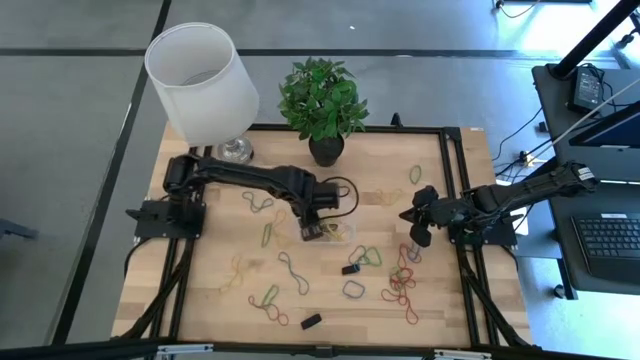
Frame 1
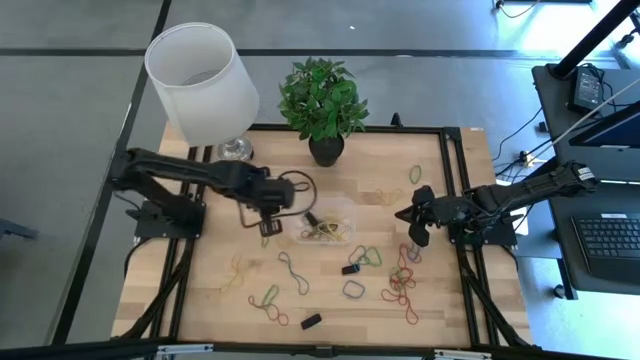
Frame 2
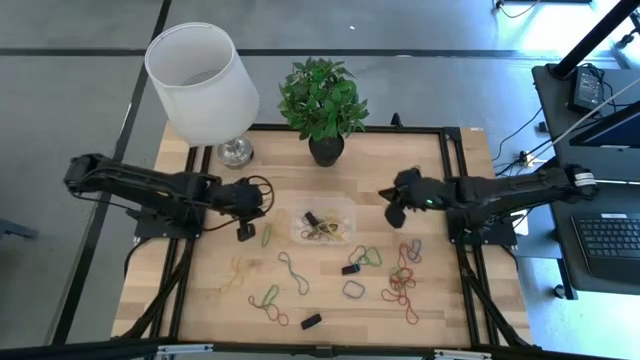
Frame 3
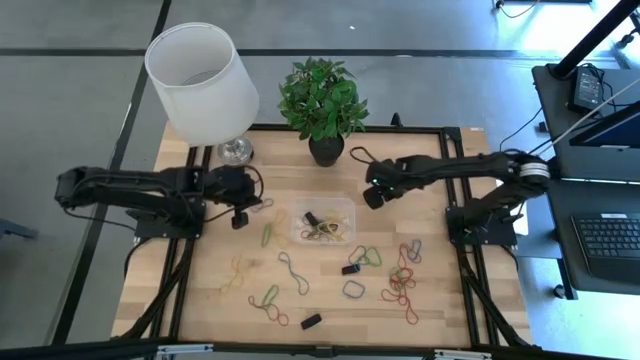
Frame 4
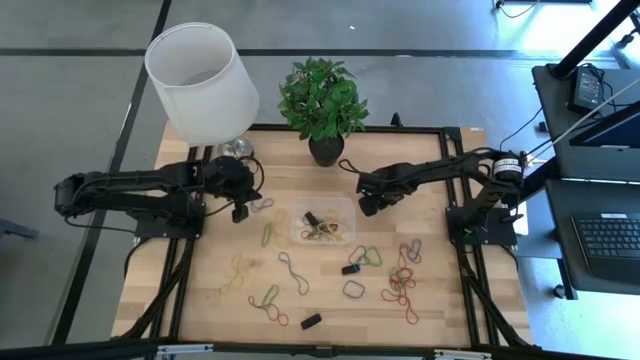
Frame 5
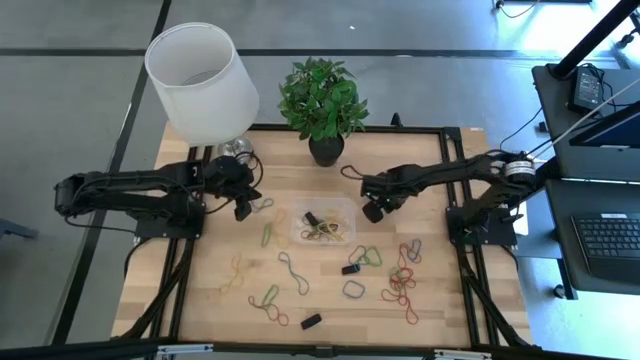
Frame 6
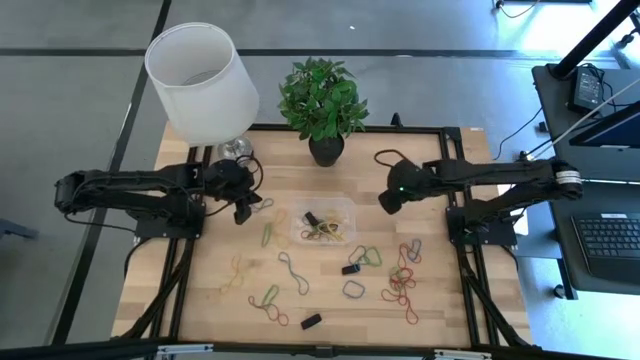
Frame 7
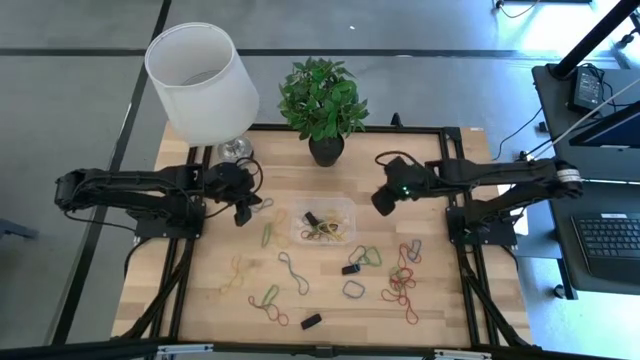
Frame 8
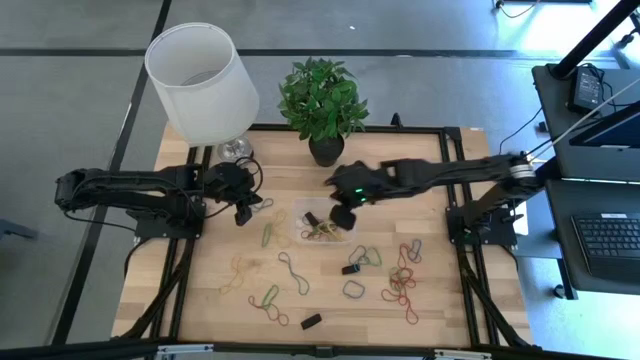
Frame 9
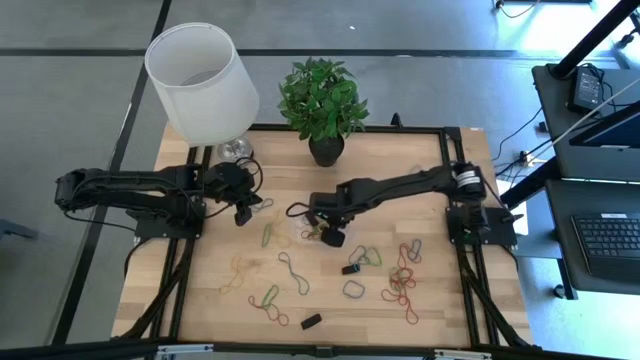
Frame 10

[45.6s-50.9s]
Task: Pick and place rubber bands into bin
Put the top yellow rubber band into the transparent container

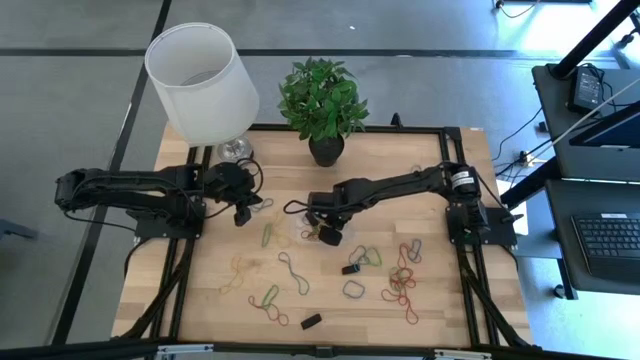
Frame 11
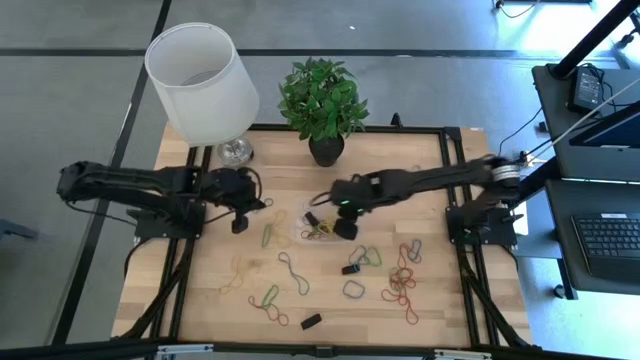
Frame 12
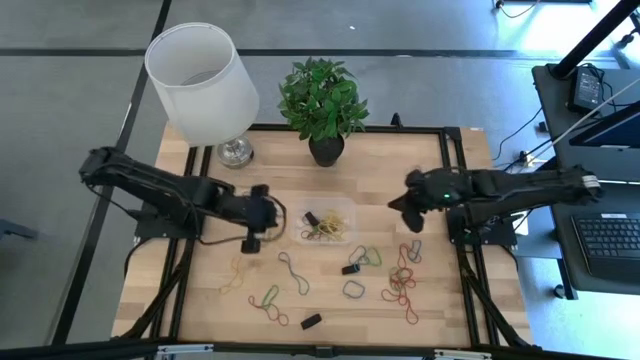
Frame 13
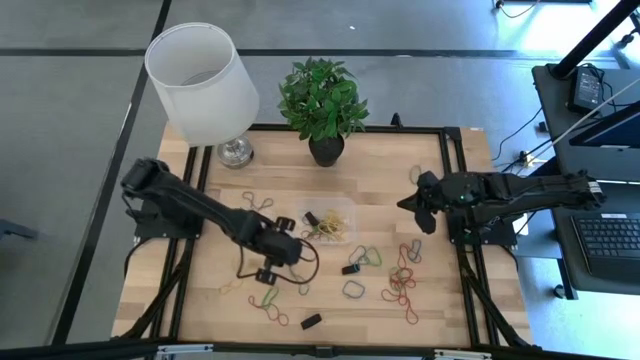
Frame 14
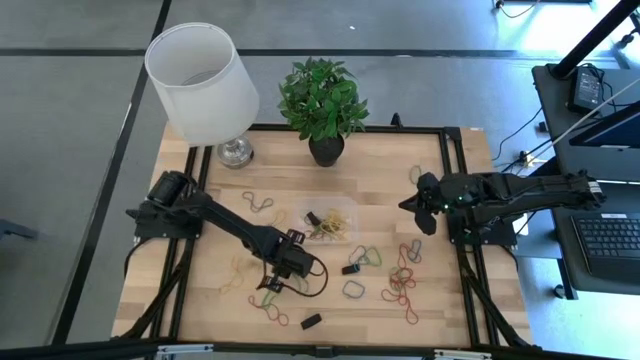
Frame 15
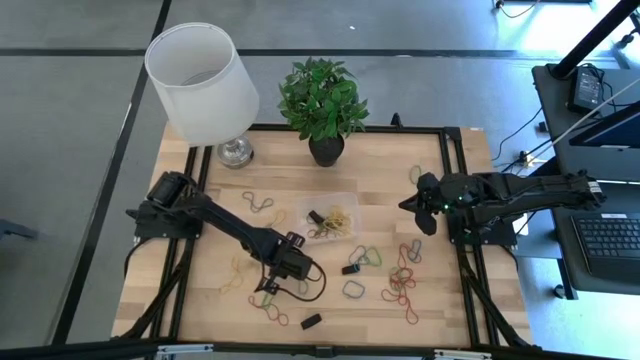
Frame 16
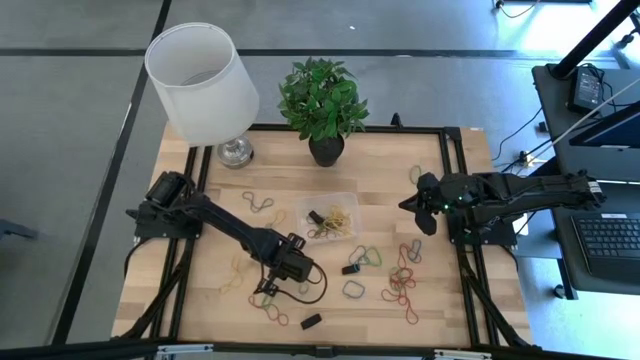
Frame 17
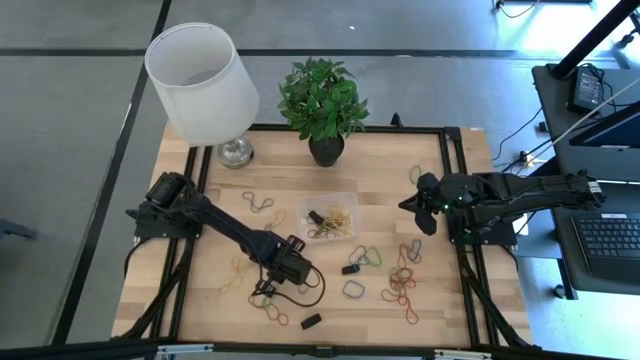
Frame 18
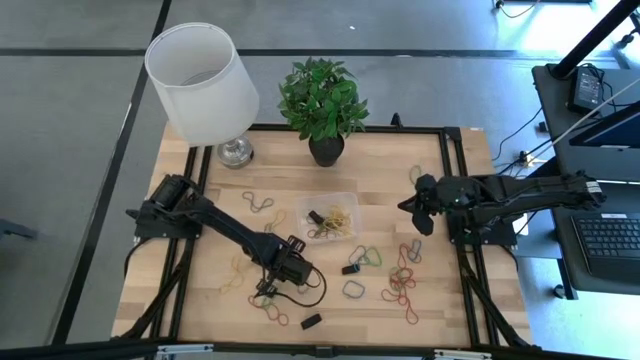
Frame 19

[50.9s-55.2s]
Put the blue rubber band into the transparent container

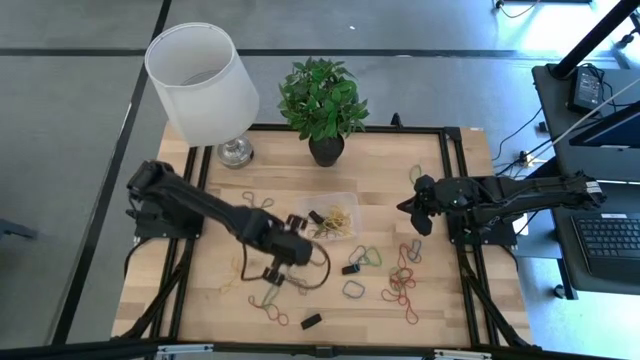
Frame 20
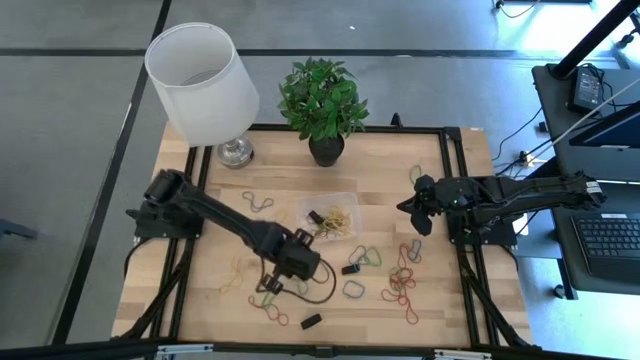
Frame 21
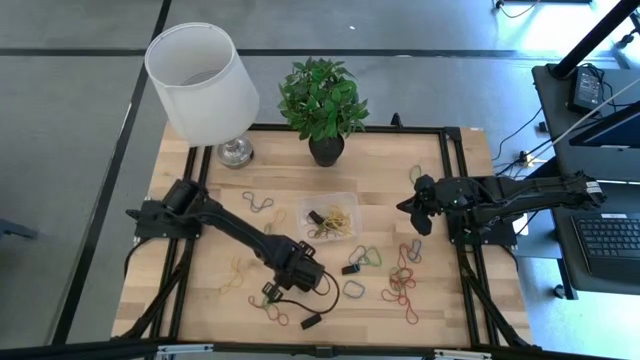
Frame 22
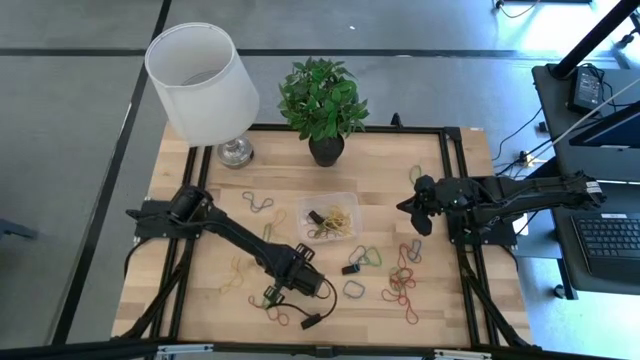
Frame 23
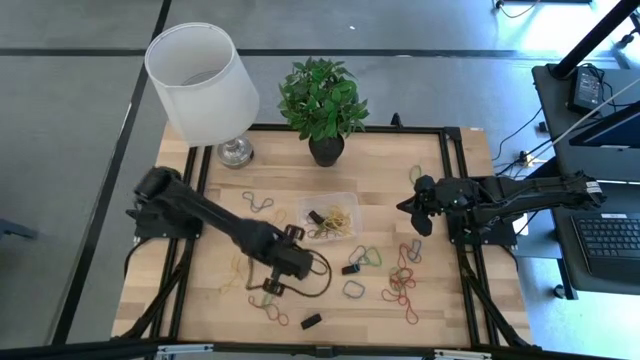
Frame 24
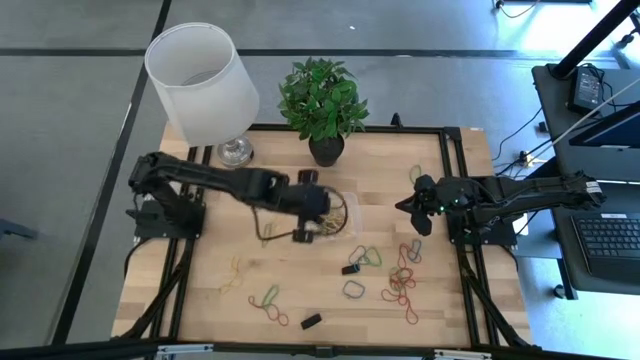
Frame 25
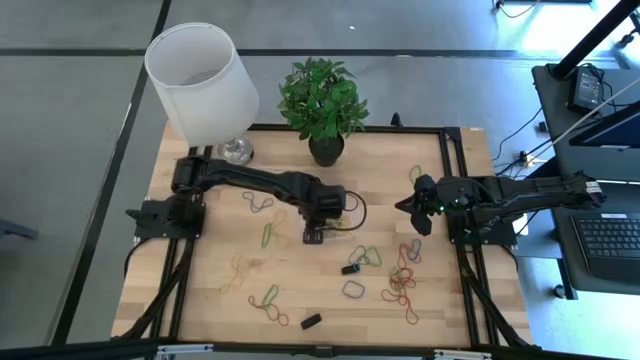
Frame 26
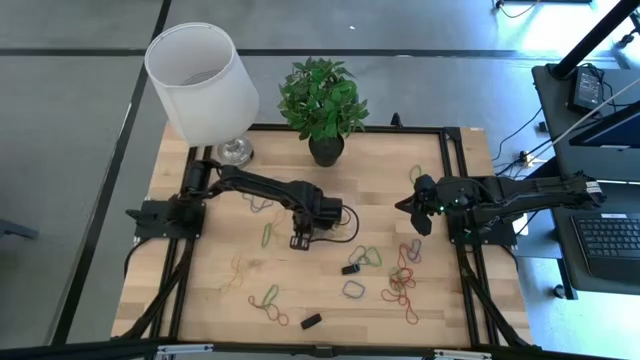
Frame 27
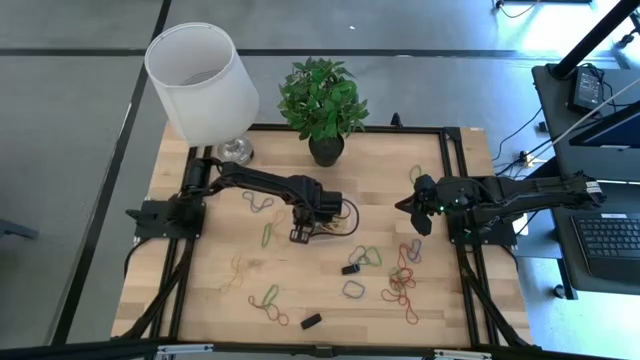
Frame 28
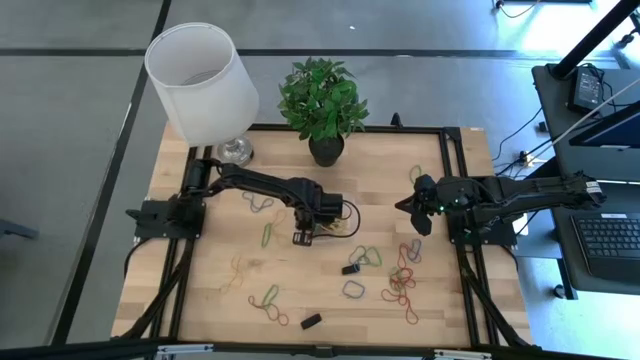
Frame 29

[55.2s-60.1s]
Put the blue rubber band into the transparent container

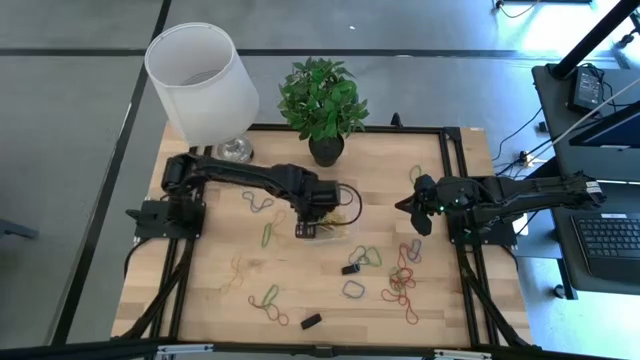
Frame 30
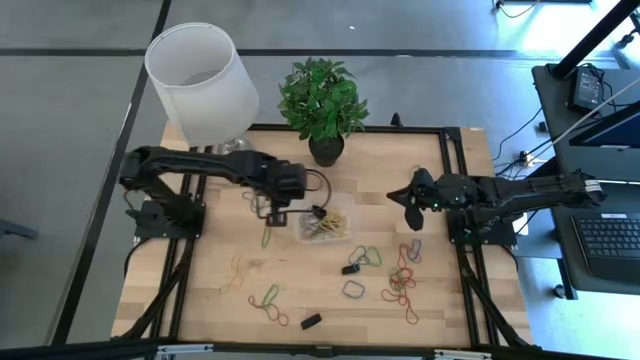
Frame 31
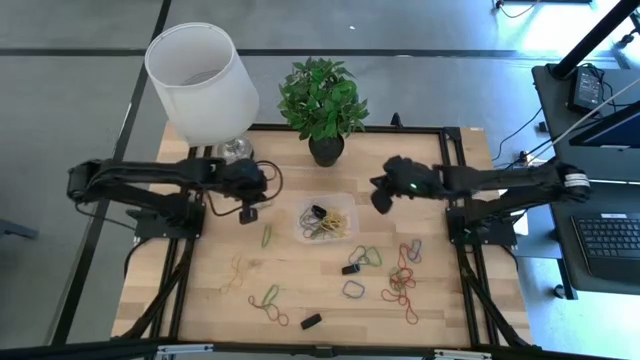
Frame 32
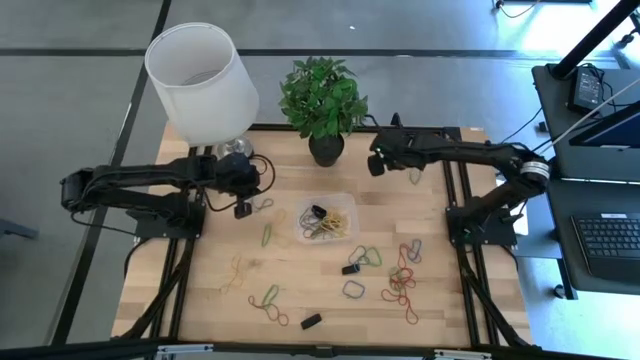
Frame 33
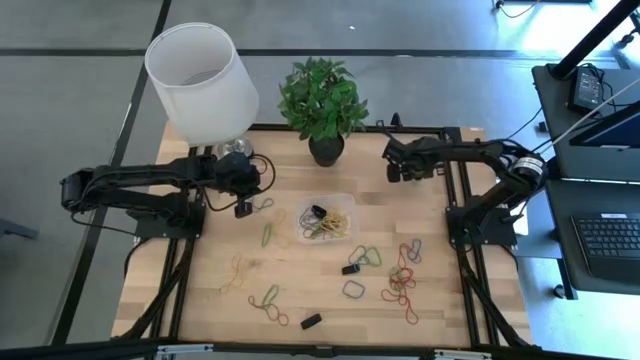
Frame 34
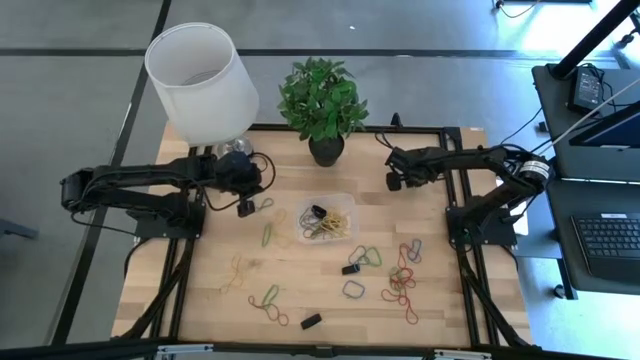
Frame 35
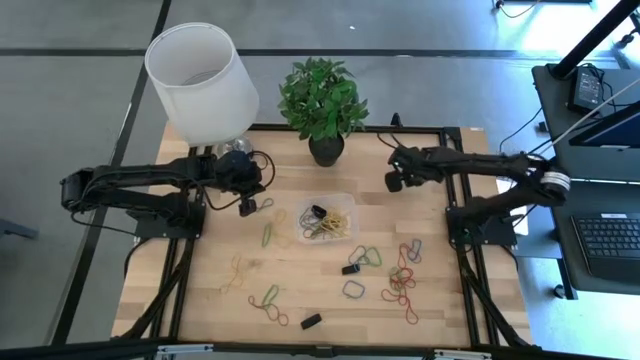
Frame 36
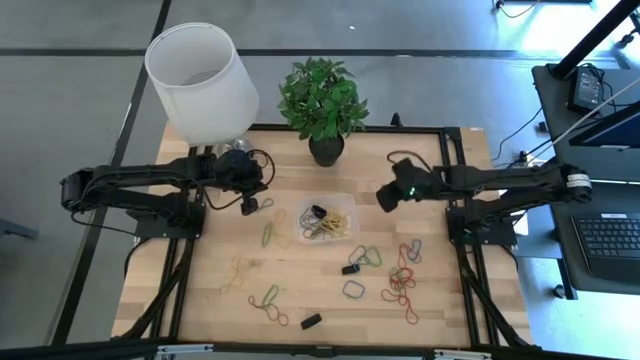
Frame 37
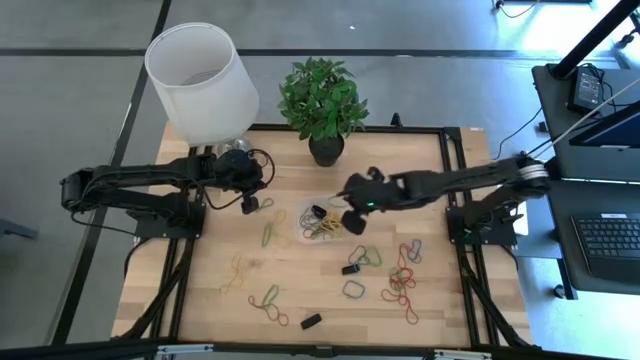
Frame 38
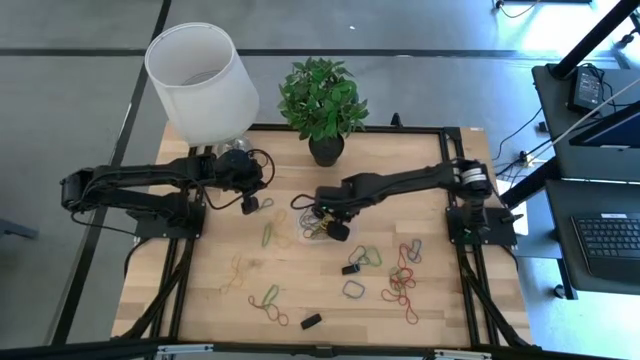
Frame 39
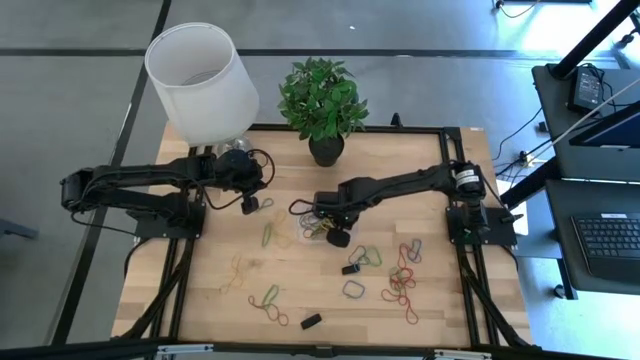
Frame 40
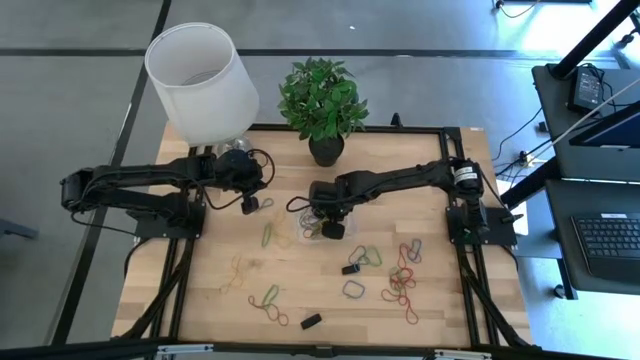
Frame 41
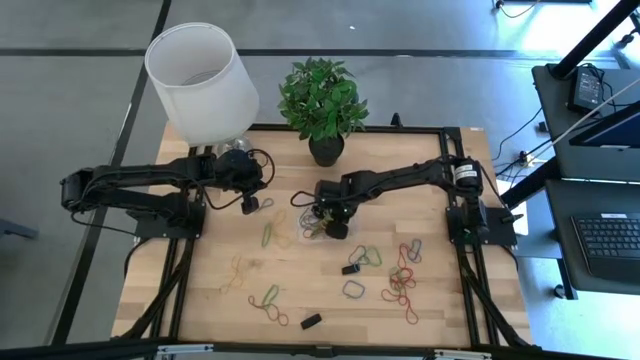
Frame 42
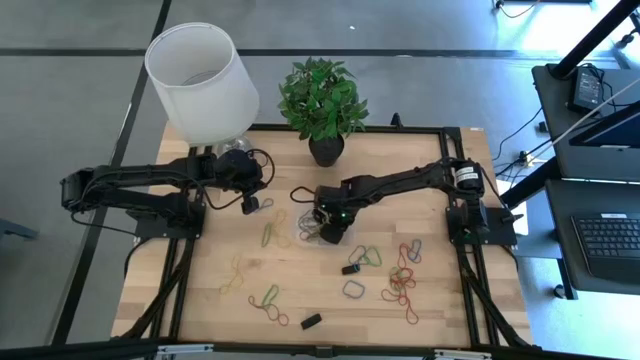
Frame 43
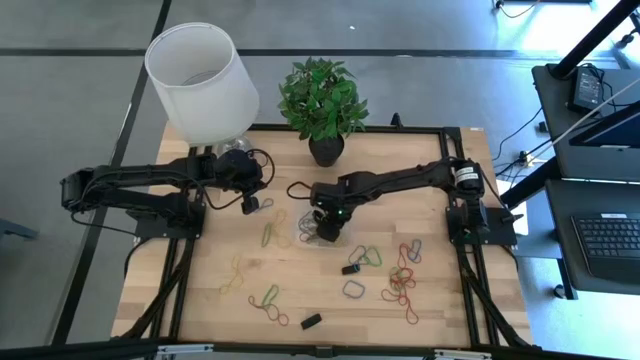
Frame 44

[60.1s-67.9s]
Put the green rubber band into the transparent container

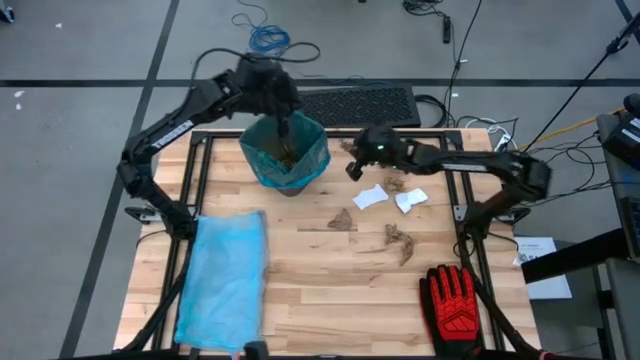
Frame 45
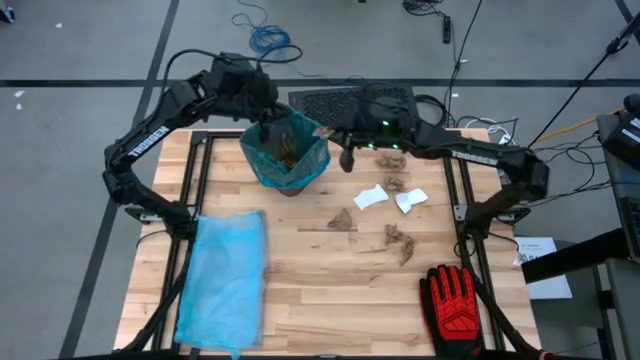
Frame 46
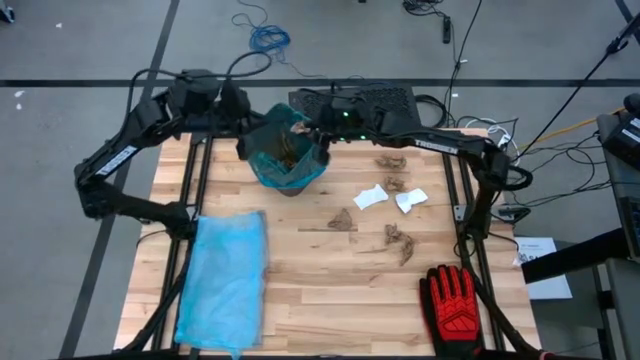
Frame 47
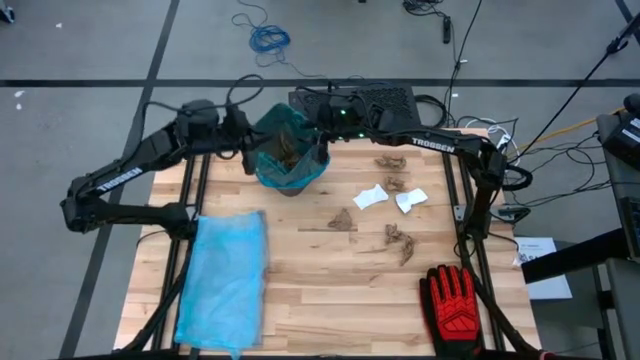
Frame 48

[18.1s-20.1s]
Task: place trash/remove bag and relplace
Put the brown napkin into the black trash bin
